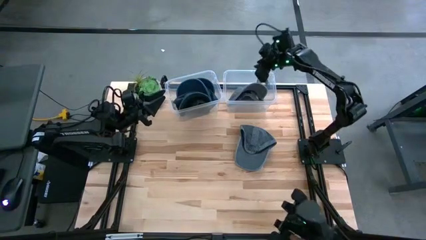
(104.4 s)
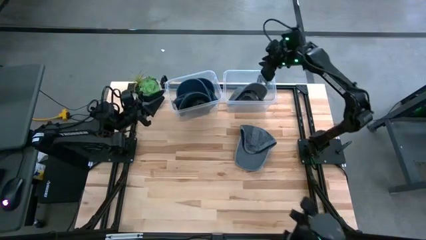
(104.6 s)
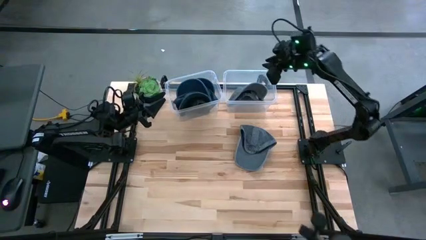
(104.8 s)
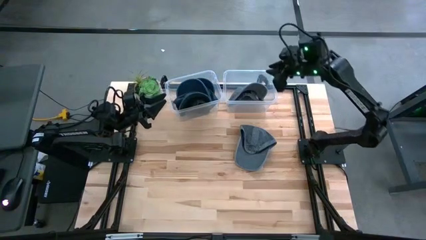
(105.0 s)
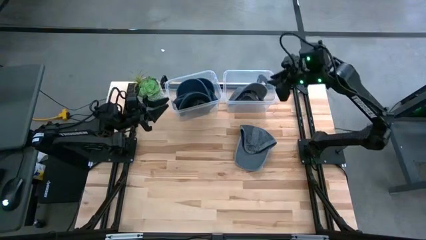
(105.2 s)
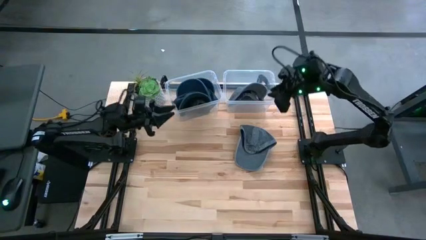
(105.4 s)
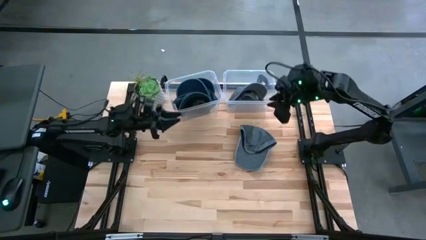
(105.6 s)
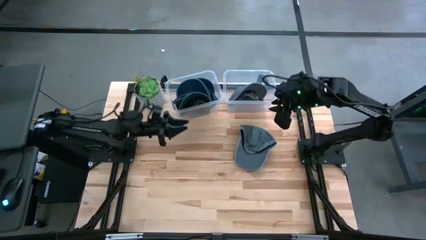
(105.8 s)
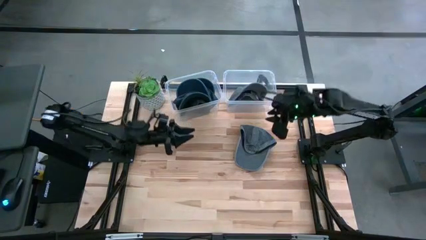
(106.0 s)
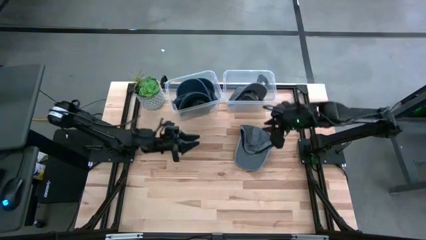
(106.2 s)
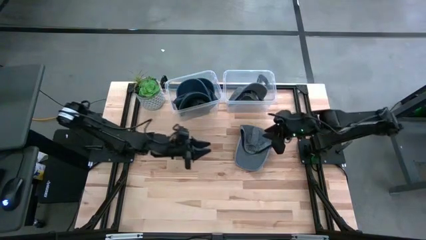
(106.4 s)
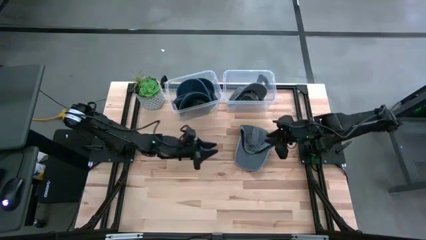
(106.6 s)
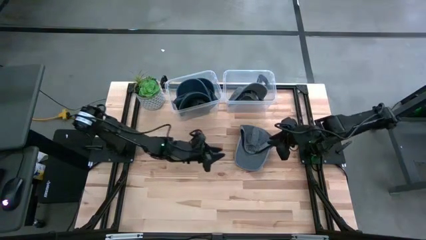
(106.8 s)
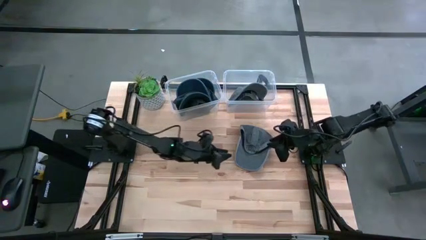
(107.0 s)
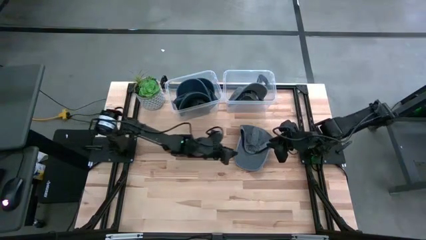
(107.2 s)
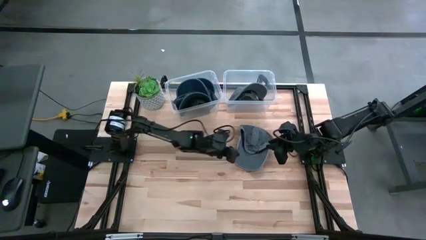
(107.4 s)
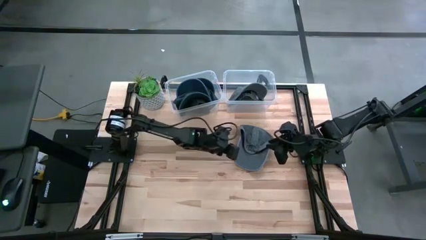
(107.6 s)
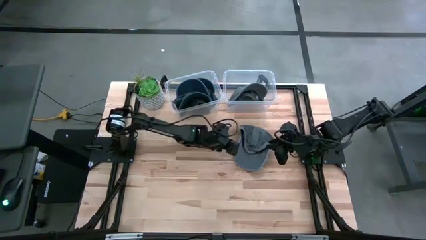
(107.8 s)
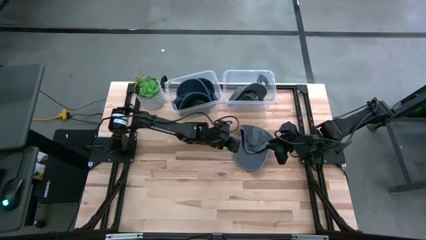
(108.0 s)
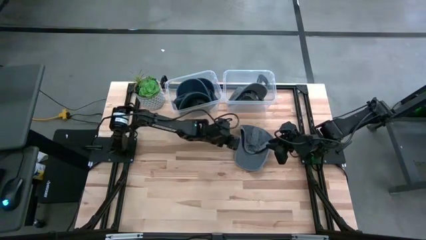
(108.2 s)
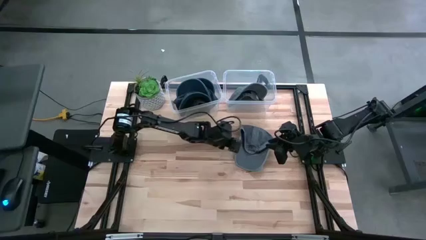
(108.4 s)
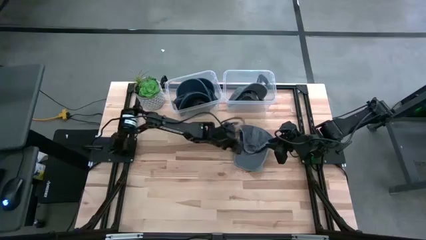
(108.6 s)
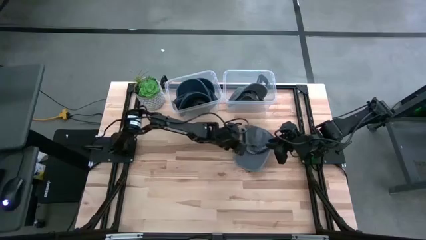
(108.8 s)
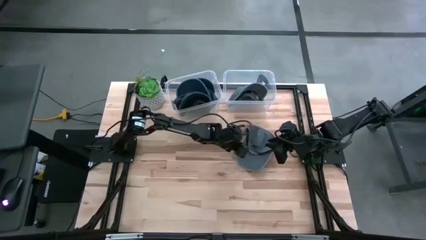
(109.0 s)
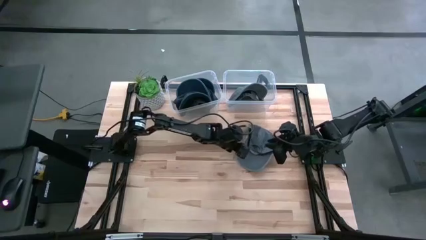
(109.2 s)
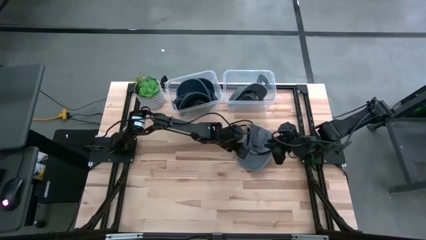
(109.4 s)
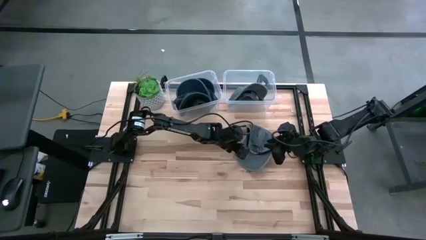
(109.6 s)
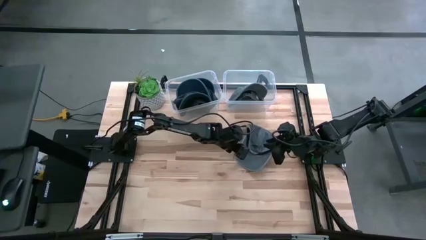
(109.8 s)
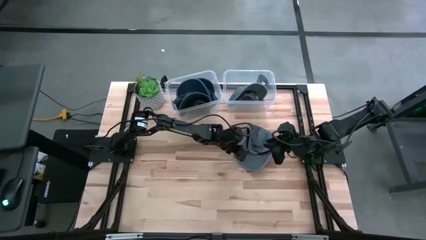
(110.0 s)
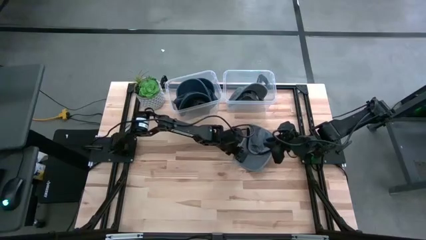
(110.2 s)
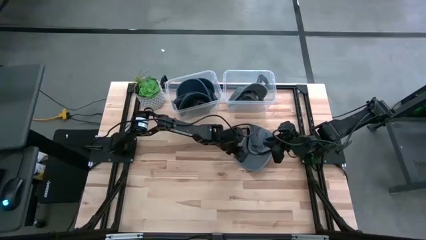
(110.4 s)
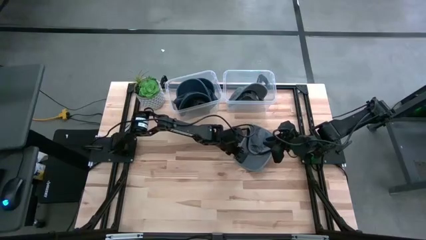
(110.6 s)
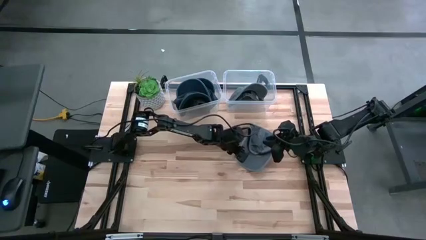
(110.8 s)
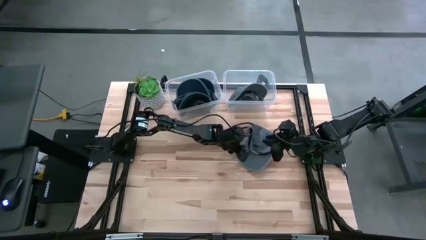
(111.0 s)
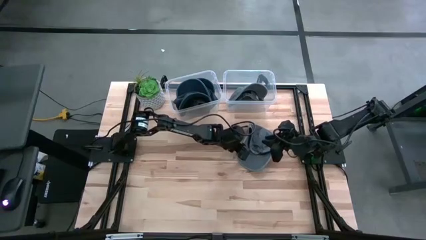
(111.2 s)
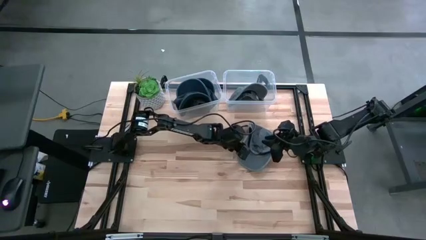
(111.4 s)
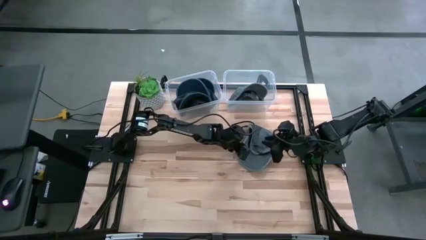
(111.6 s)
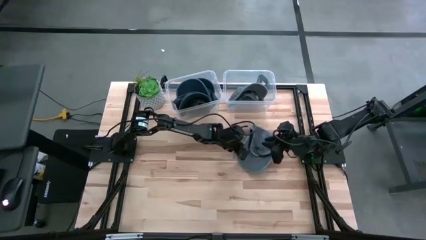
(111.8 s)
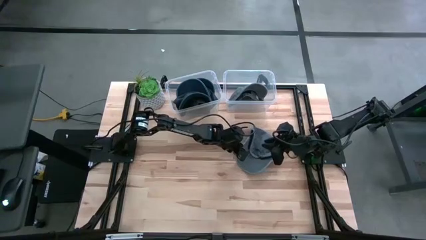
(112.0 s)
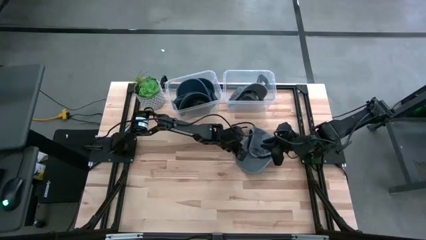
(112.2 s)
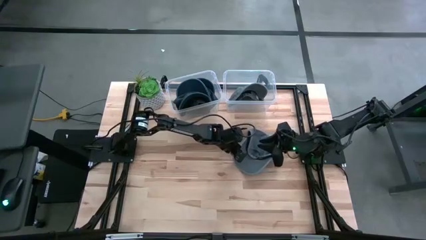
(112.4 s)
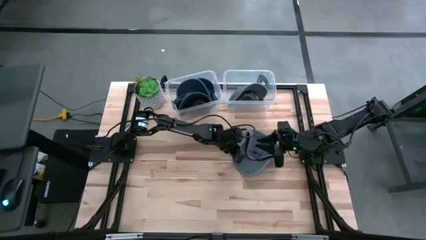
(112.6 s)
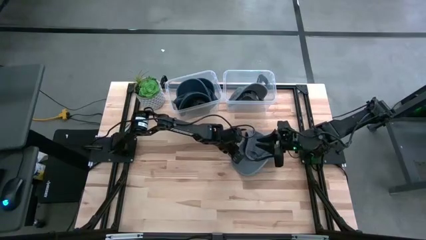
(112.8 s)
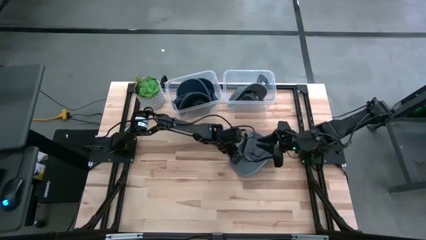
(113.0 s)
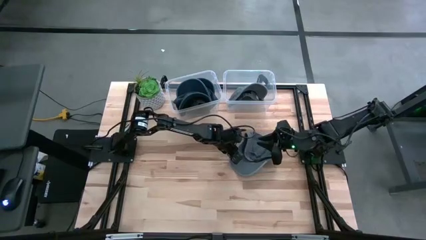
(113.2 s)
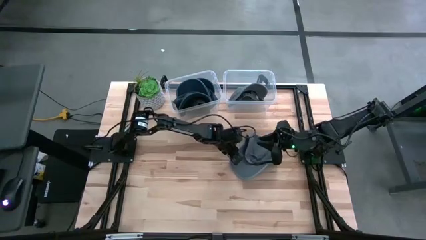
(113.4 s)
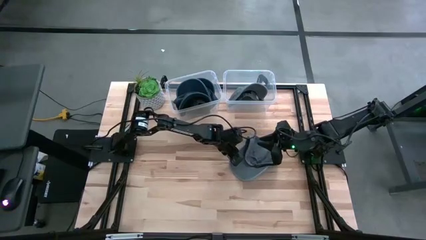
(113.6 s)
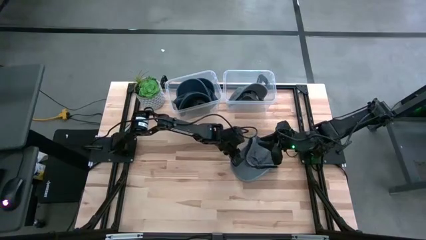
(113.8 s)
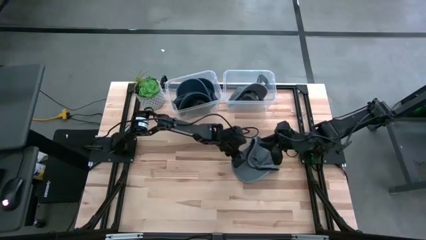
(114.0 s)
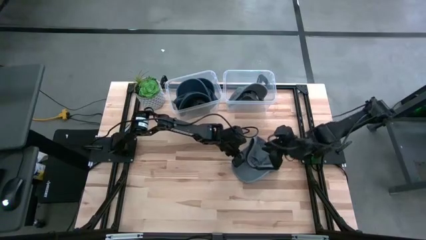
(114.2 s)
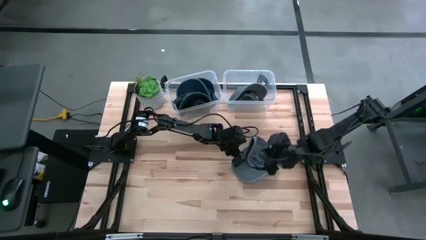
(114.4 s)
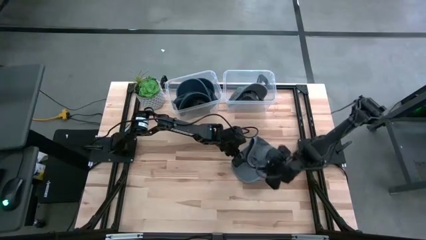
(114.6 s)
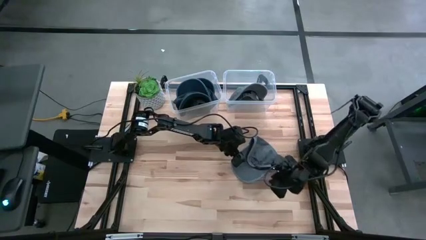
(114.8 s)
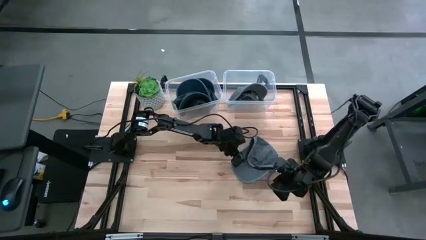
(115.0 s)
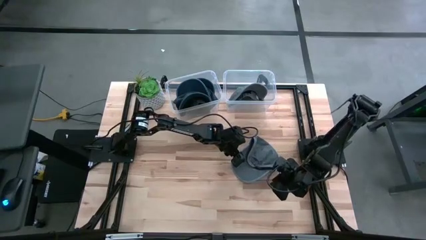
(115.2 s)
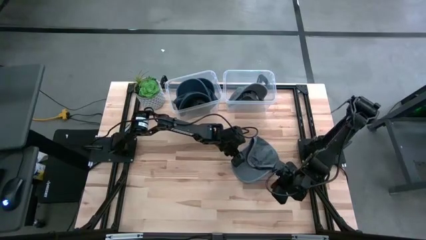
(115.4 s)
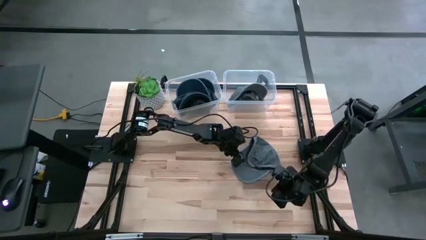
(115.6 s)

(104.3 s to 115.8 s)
Task: Pick & Place hat
Put the gray cap into the right transparent bin

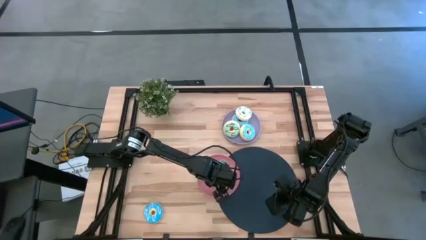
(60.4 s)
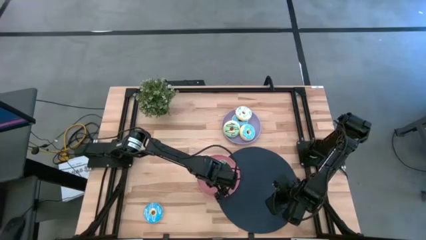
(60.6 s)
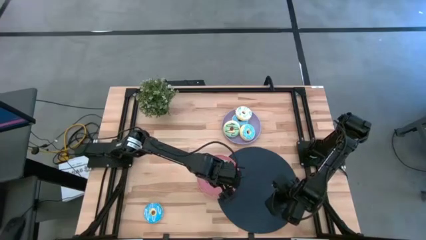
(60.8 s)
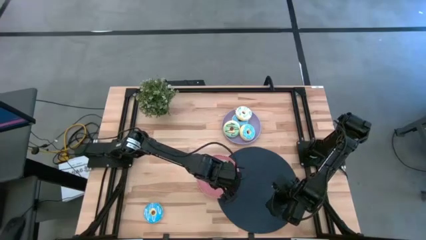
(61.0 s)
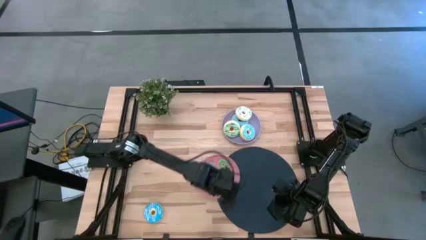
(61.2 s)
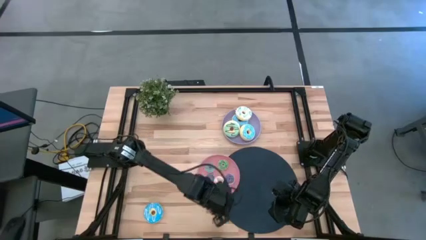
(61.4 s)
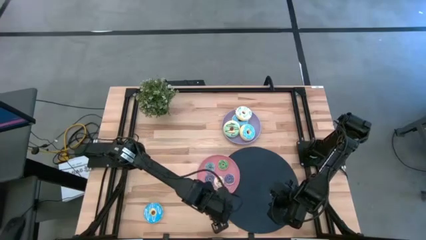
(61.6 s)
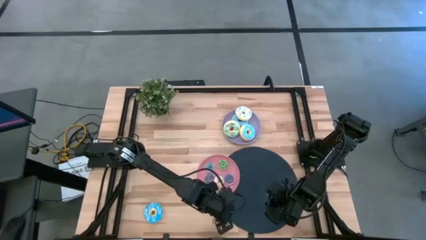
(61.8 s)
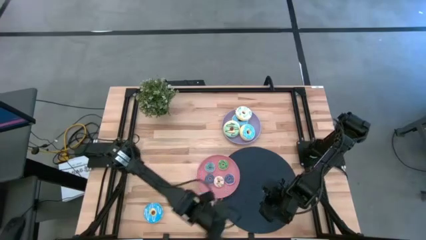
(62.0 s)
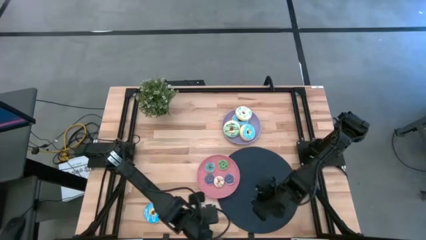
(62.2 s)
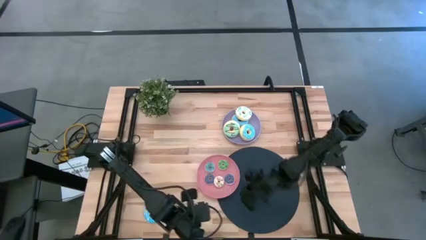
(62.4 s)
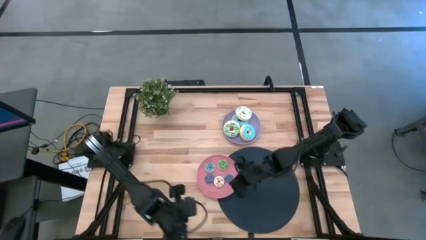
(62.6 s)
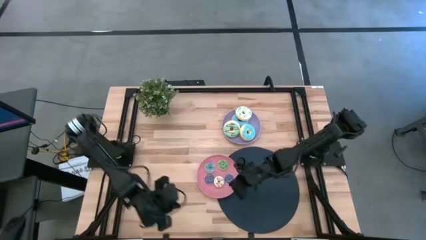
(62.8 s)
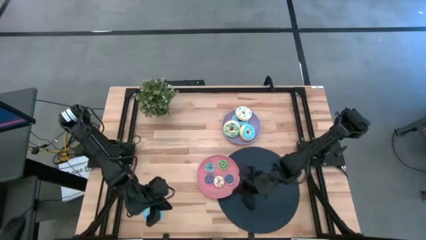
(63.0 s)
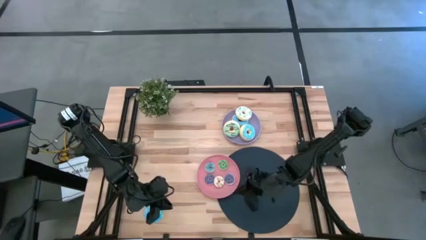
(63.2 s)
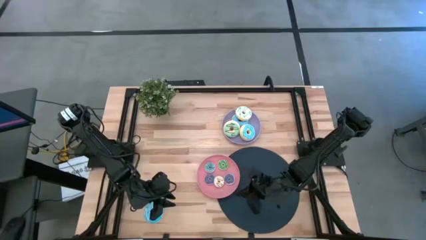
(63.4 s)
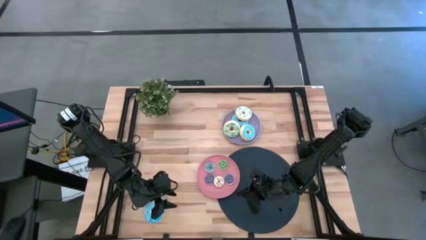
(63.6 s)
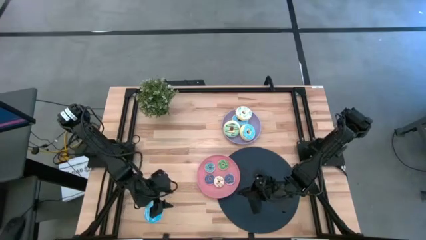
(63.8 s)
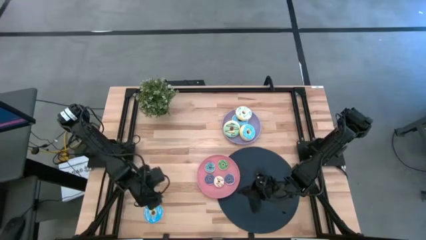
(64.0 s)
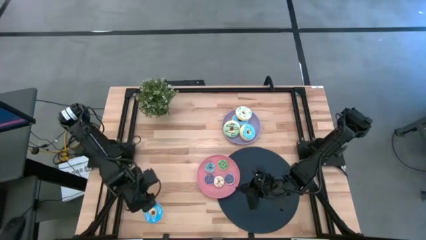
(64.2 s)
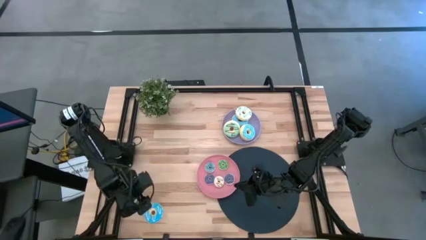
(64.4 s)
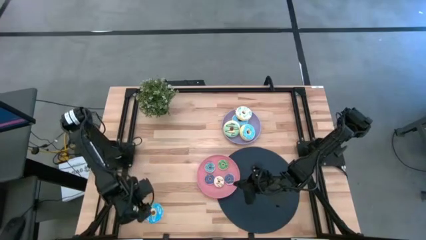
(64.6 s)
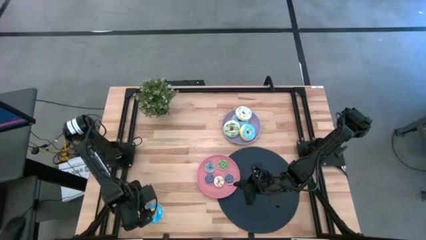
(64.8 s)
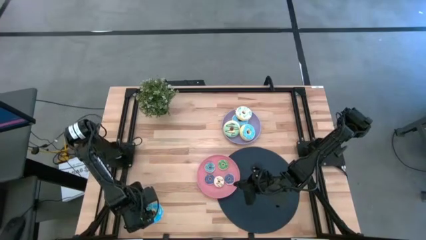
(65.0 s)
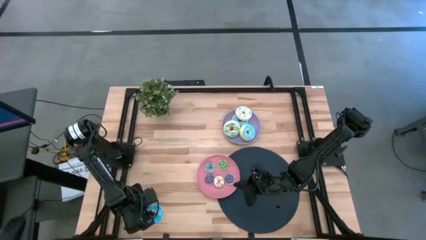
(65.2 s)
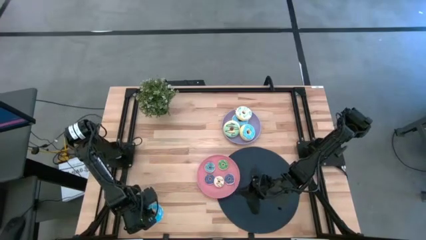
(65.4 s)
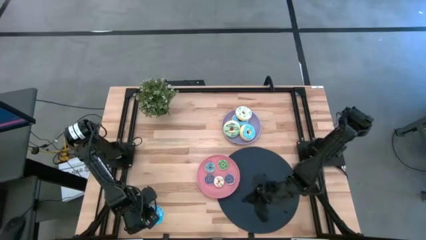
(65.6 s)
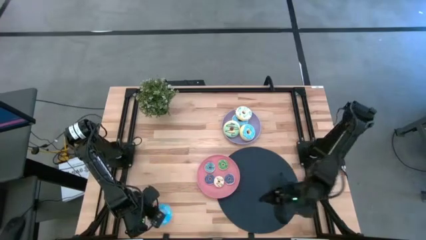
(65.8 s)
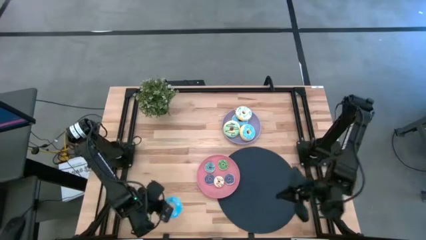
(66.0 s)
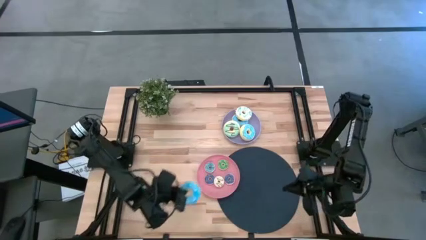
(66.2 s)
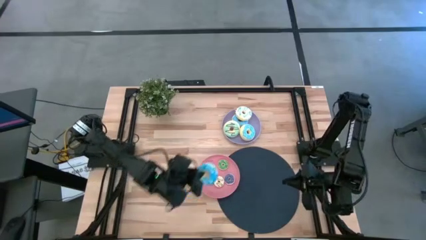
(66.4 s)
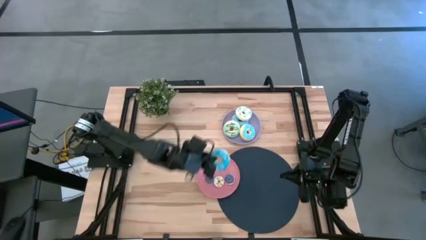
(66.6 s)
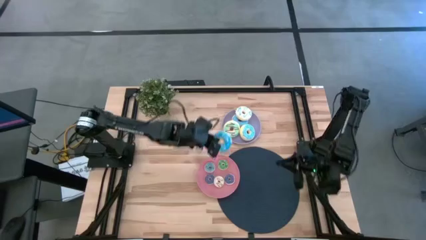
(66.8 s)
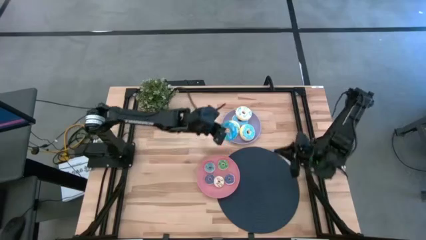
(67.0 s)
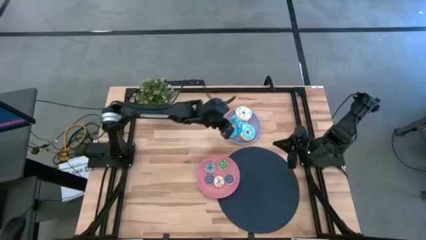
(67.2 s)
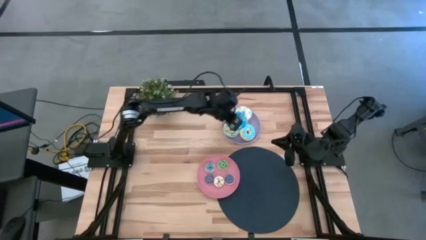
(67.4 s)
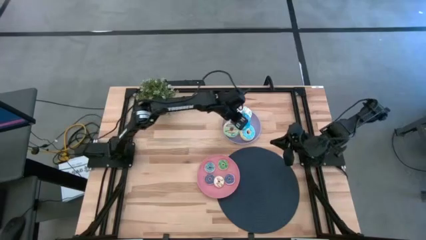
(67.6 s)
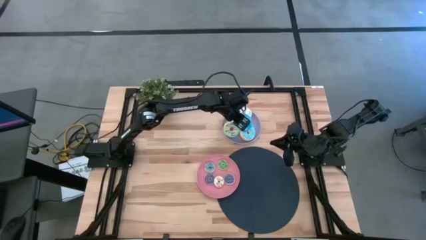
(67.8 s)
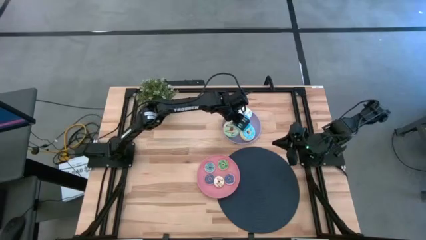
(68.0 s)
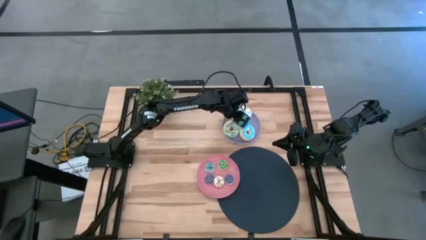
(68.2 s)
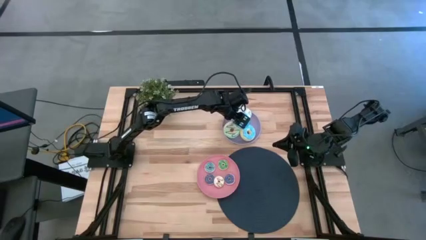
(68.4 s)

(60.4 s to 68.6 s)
Task: Pick & Place donuts
Put the big blue donut on the purple plate
